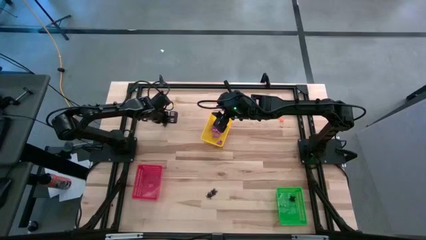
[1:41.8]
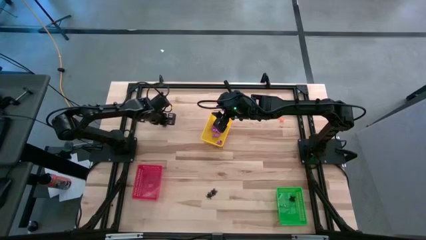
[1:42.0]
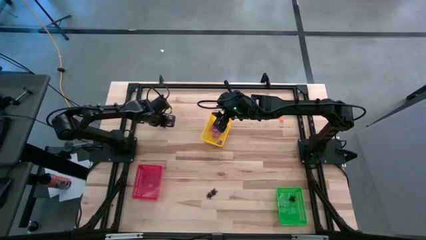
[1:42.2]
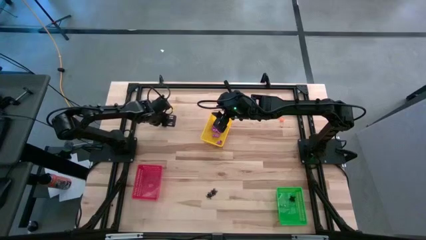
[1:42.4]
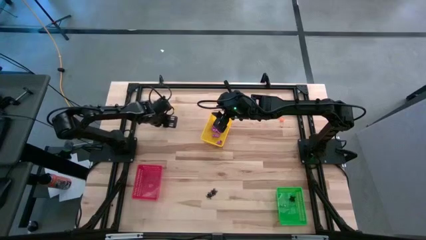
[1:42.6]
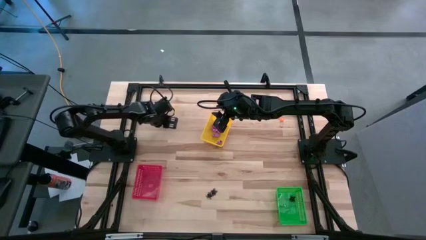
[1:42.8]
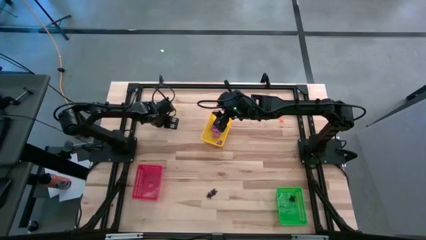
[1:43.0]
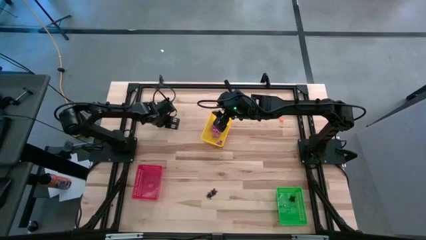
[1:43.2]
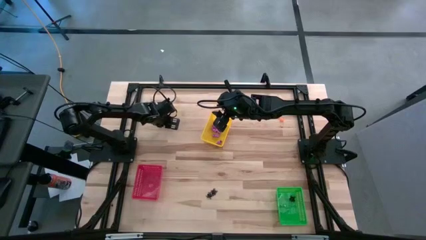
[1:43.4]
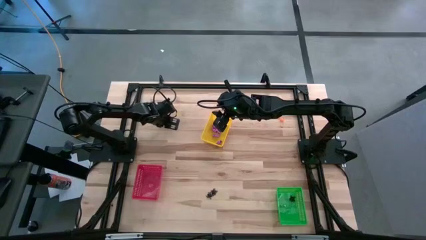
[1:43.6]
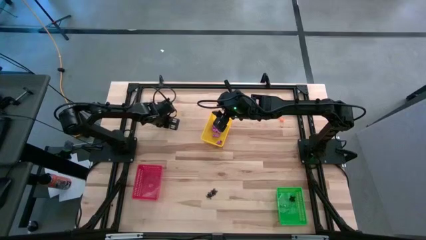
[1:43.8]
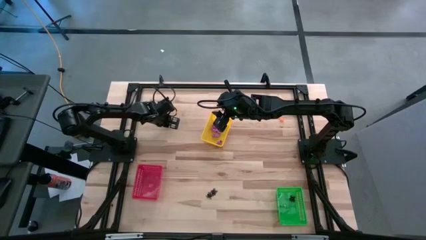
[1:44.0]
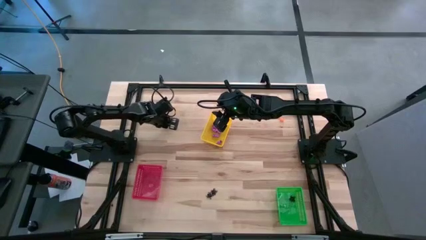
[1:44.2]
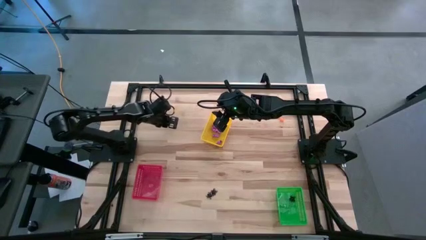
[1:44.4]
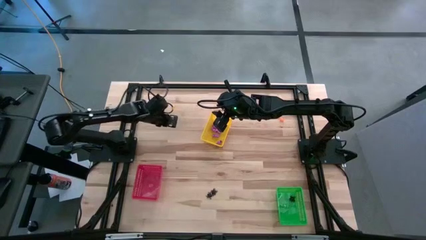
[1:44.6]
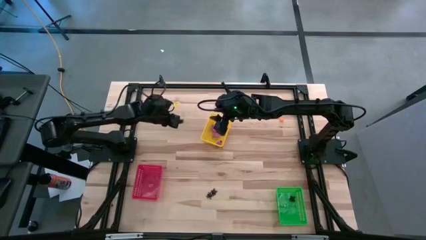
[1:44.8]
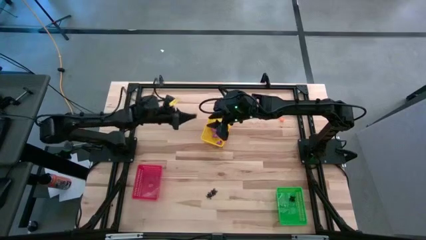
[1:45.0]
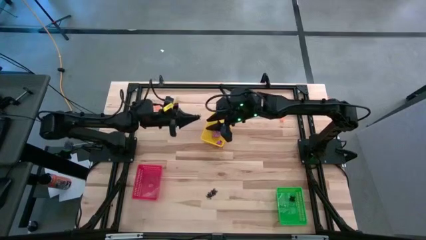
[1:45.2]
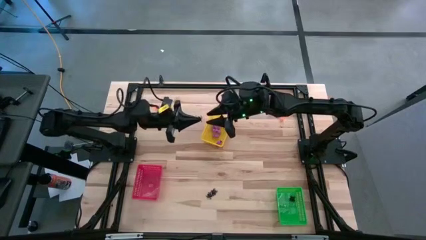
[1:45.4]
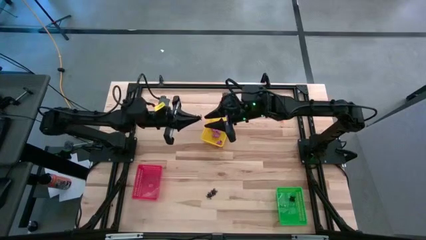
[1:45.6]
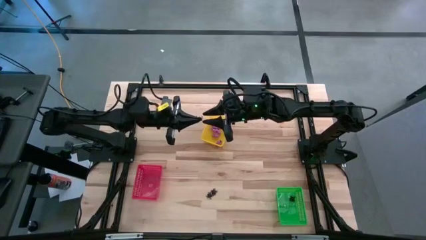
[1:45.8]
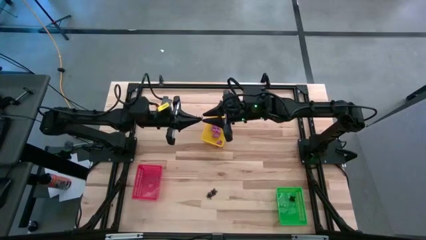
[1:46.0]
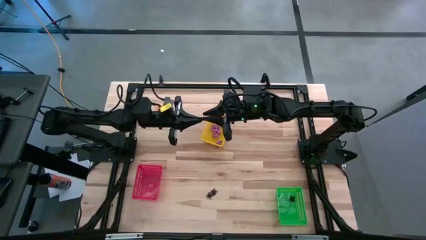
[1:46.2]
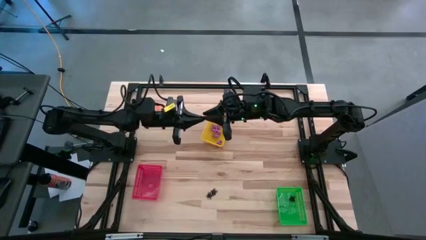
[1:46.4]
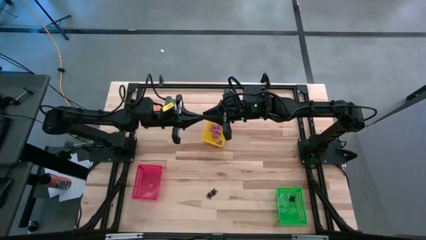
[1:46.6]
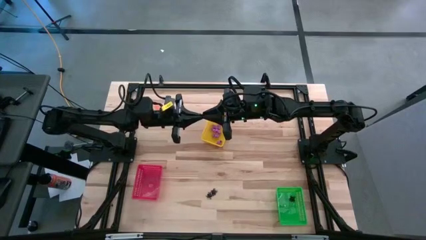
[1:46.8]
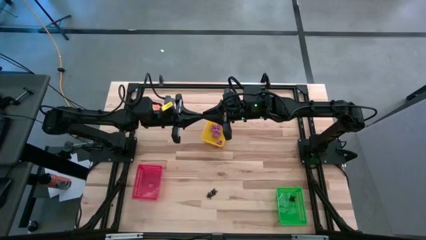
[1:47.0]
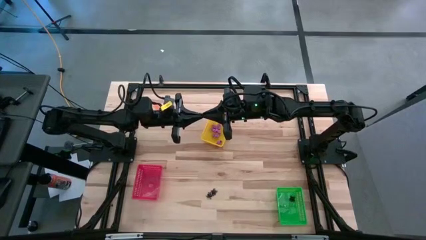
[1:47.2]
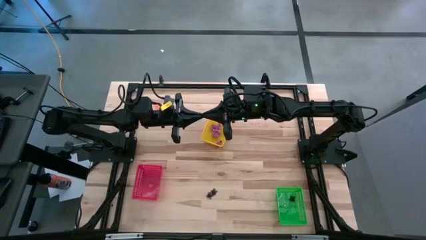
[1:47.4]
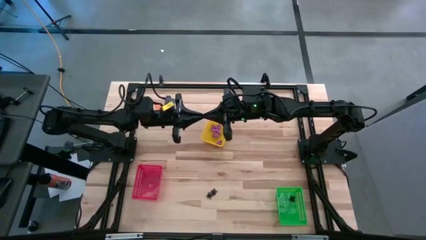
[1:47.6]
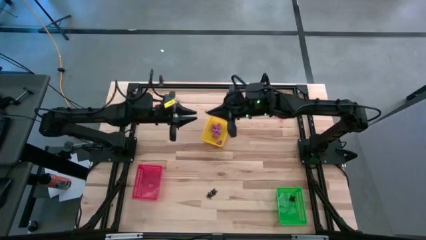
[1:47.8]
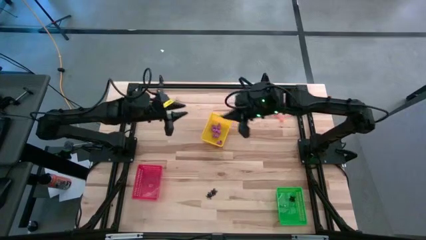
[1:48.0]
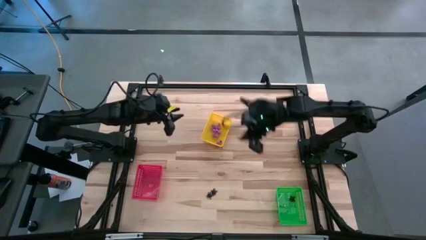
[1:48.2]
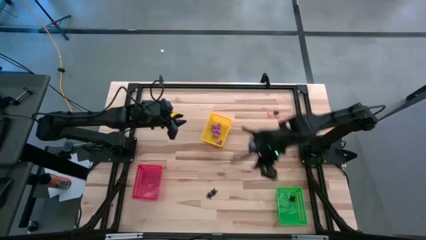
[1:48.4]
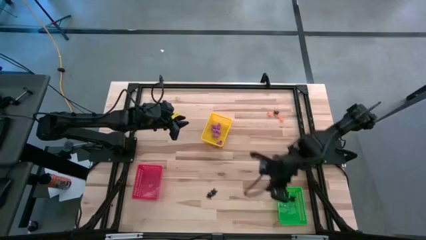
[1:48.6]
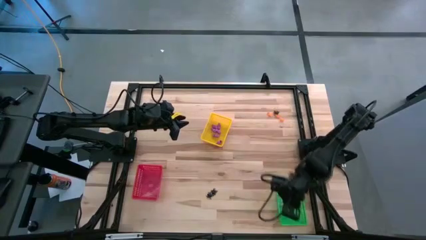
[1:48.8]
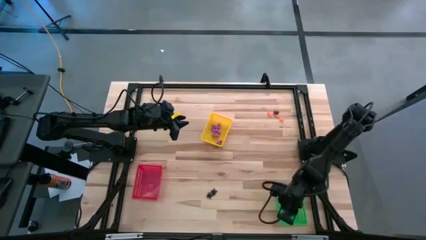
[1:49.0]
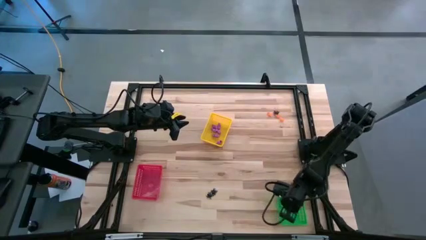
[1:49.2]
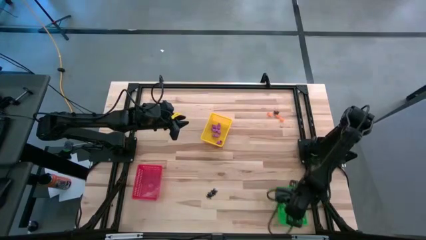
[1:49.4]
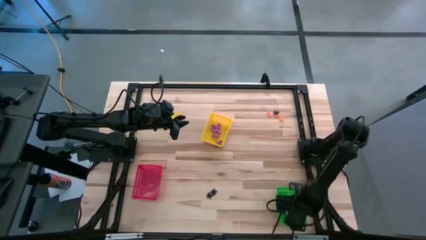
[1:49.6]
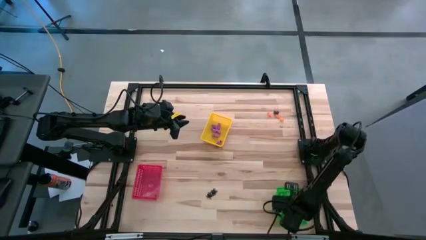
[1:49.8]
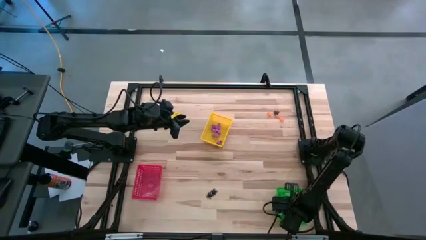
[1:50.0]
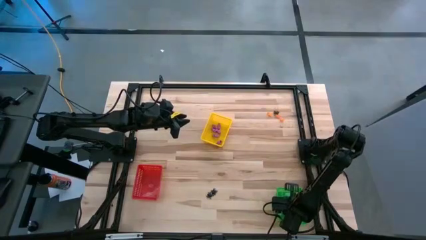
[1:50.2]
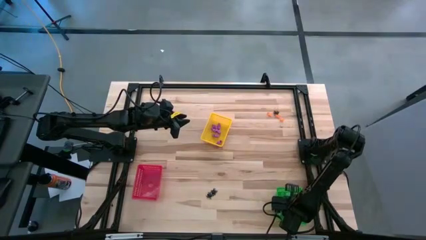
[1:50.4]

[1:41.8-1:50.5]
Task: Sort Halloween decoration
Put the black spider toy into the green bin
